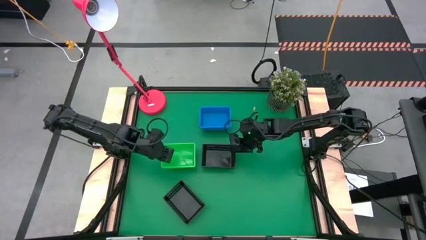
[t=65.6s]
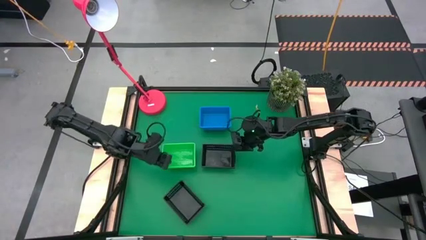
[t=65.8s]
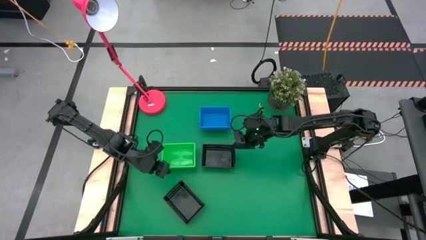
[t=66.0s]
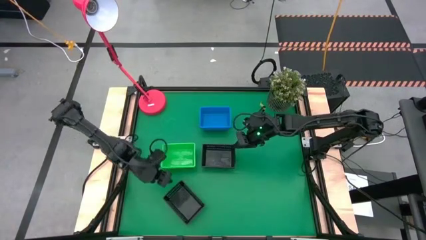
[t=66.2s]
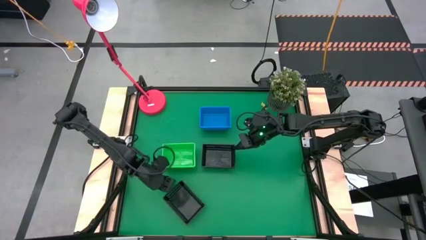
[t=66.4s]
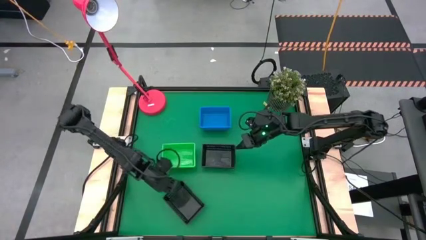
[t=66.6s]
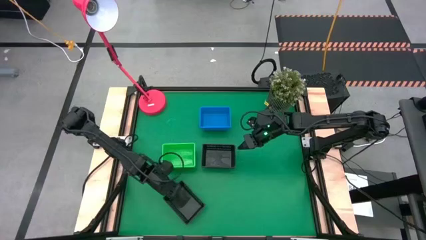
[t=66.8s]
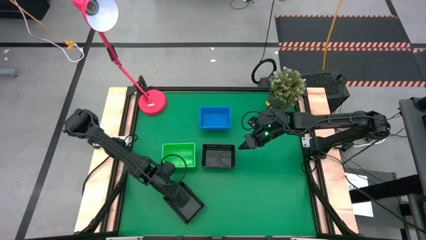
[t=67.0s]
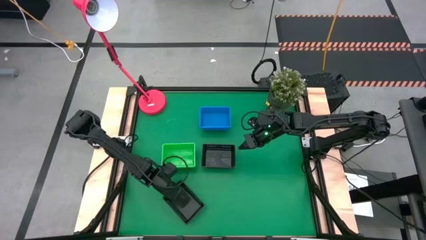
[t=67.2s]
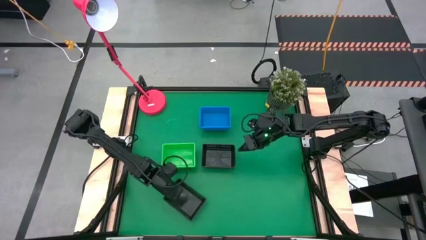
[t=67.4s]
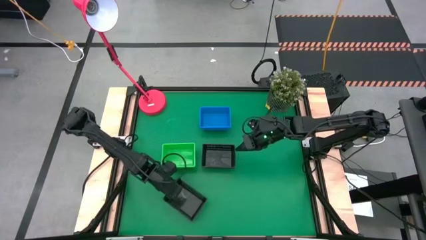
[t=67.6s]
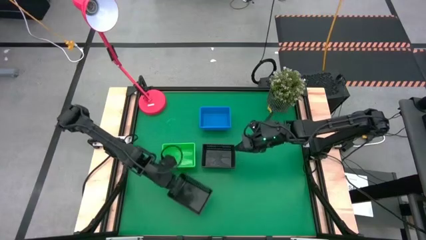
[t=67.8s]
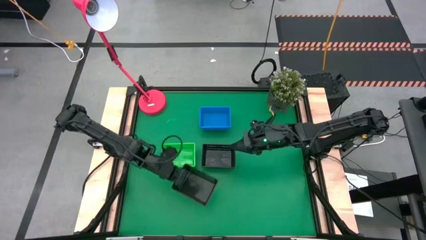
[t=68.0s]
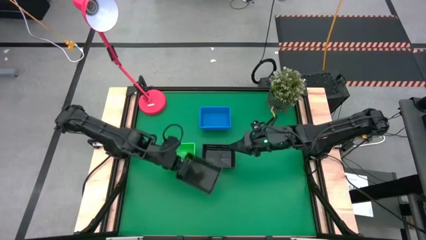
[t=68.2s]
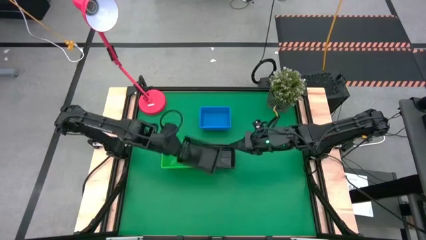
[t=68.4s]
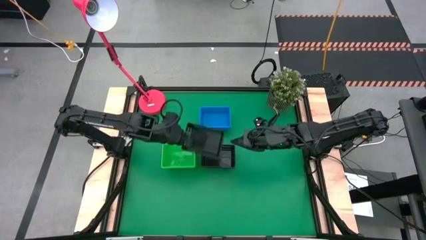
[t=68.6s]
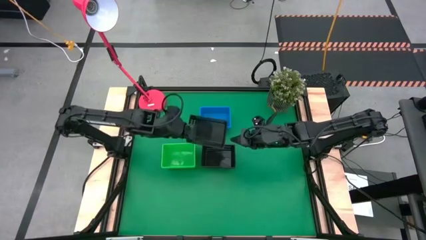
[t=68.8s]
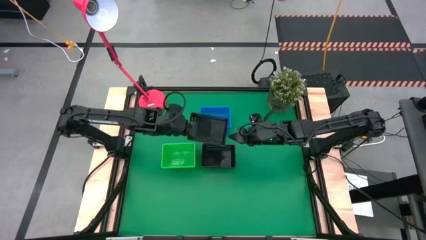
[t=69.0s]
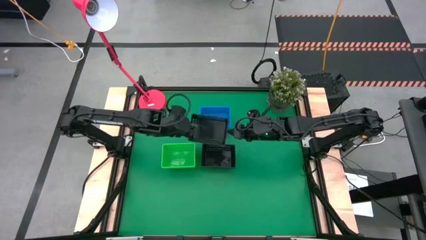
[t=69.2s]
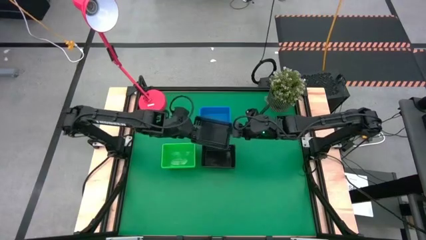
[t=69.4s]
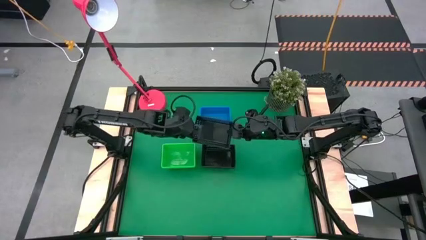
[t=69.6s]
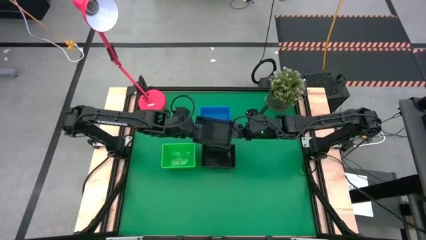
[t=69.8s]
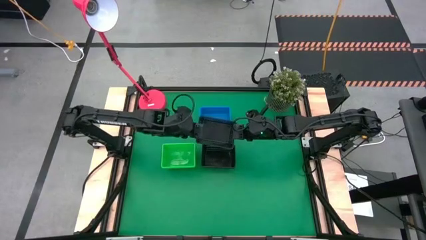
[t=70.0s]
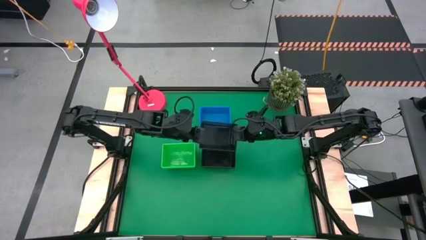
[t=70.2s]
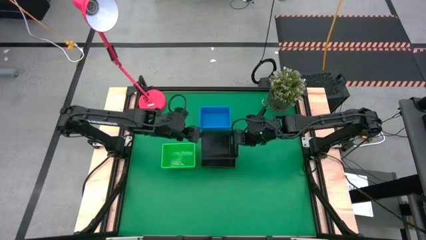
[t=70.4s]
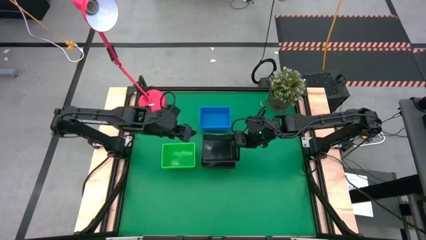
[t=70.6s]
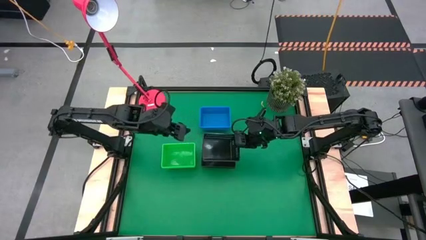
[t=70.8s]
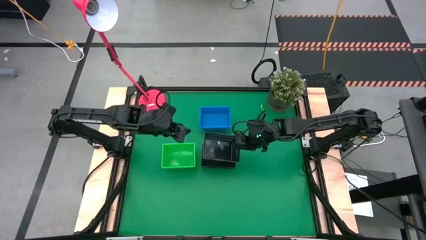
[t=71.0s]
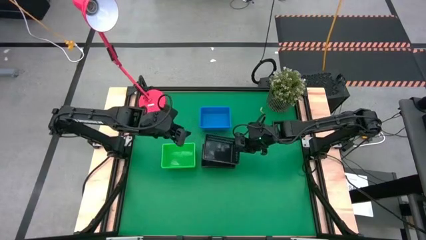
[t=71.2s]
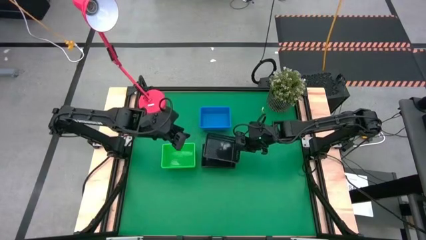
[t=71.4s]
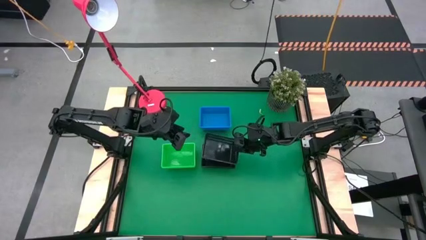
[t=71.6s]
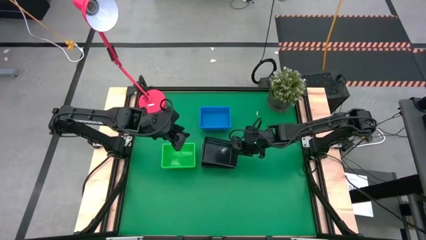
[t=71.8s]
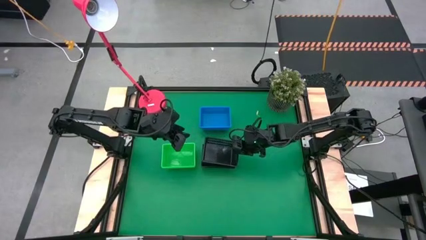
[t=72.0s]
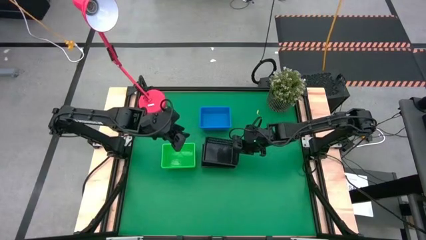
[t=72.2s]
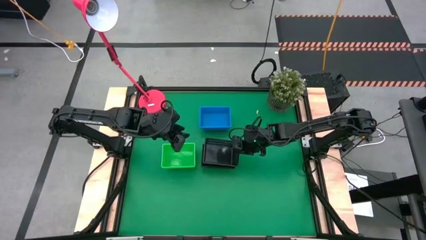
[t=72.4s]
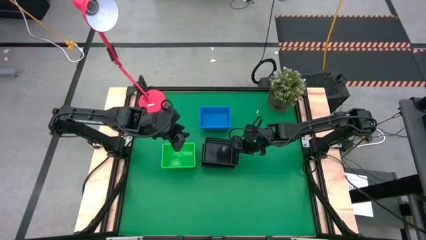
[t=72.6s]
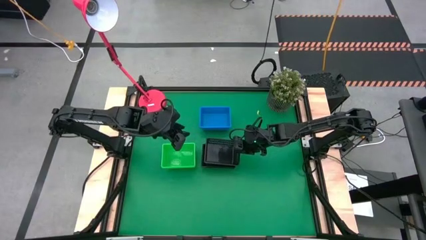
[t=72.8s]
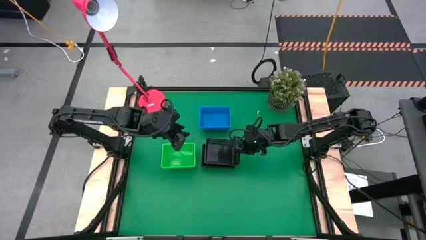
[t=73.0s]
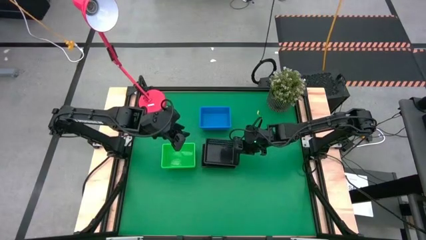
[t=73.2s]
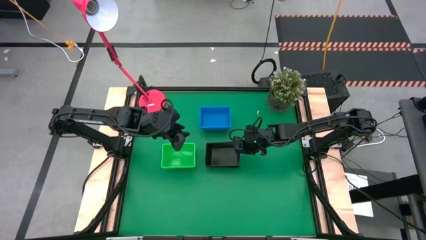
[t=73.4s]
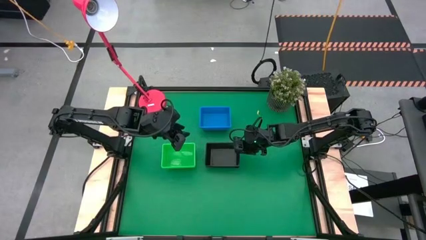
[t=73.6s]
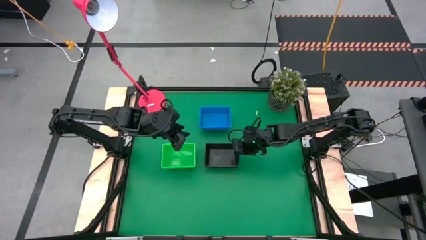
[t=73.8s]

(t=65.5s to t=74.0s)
Stack the bottom black bin on the top of the top stacked black bins

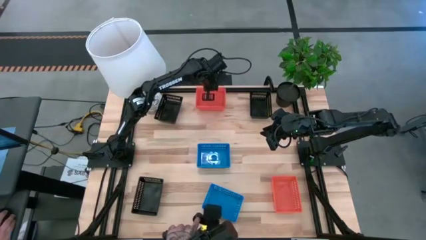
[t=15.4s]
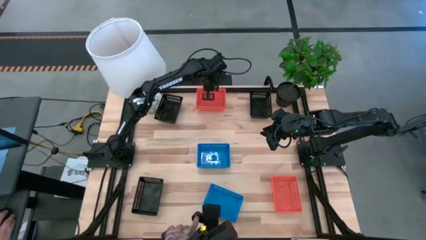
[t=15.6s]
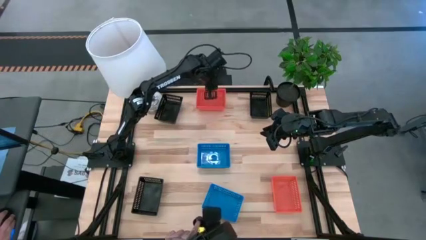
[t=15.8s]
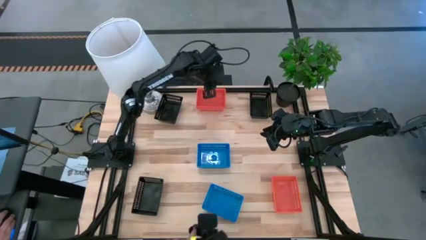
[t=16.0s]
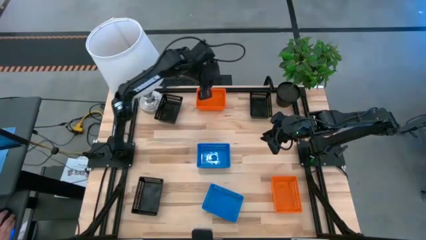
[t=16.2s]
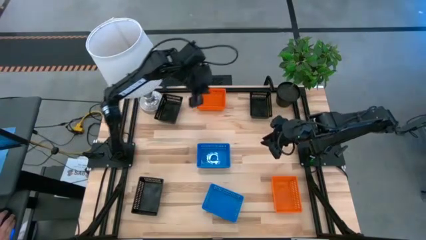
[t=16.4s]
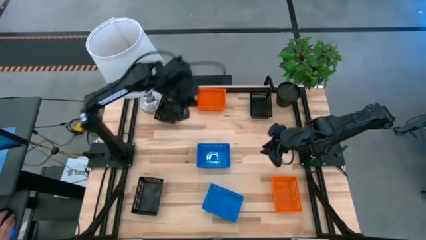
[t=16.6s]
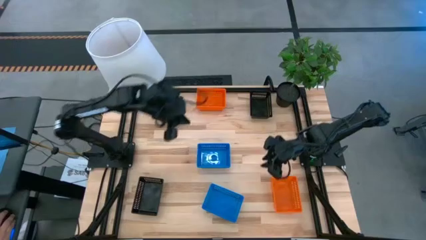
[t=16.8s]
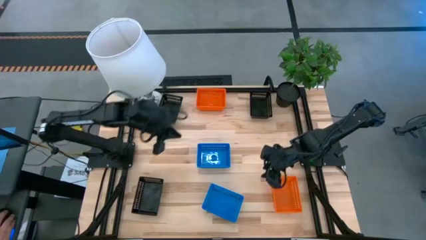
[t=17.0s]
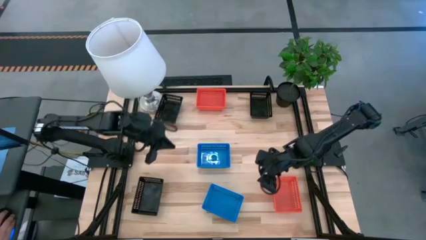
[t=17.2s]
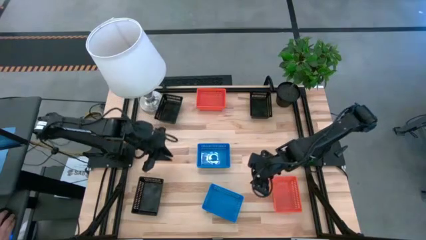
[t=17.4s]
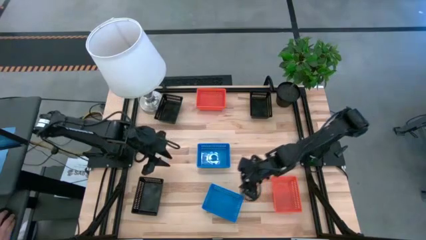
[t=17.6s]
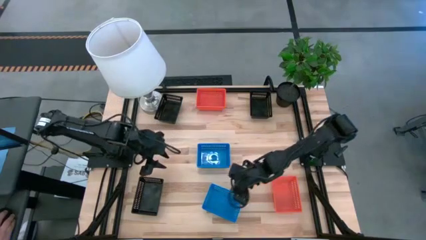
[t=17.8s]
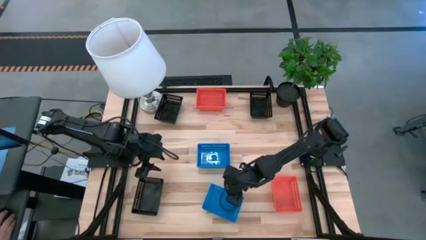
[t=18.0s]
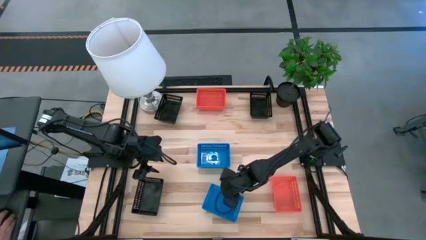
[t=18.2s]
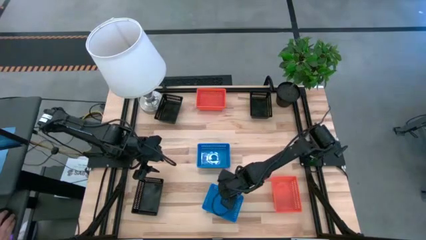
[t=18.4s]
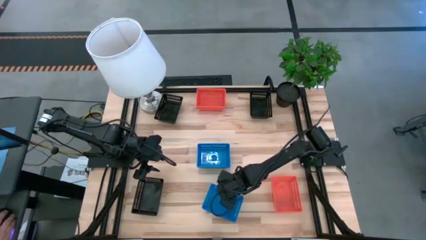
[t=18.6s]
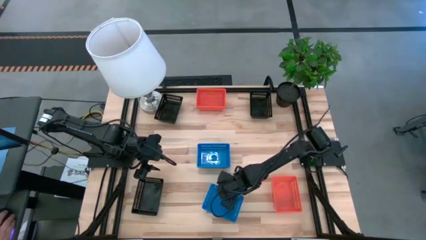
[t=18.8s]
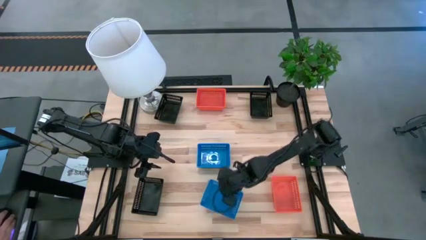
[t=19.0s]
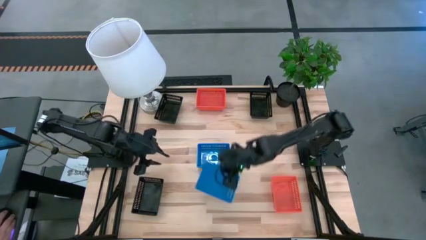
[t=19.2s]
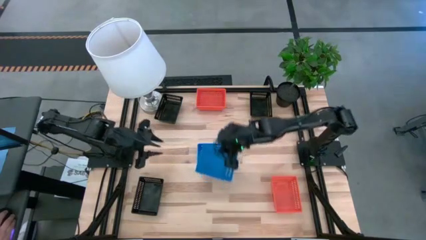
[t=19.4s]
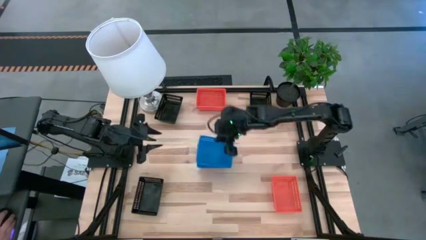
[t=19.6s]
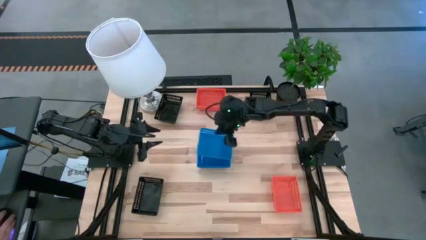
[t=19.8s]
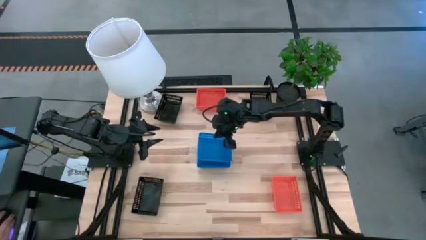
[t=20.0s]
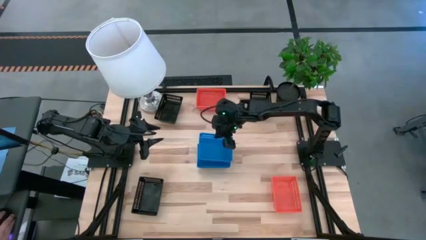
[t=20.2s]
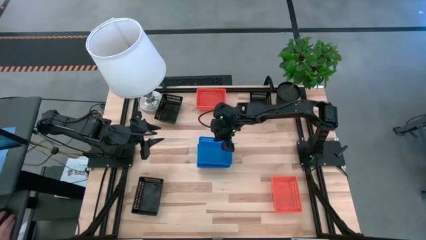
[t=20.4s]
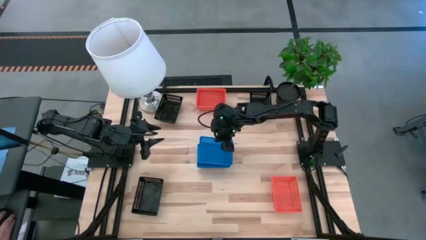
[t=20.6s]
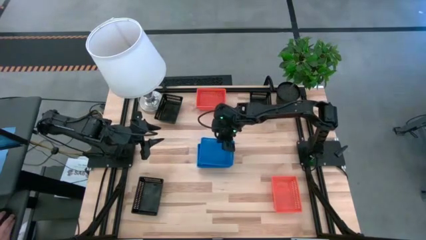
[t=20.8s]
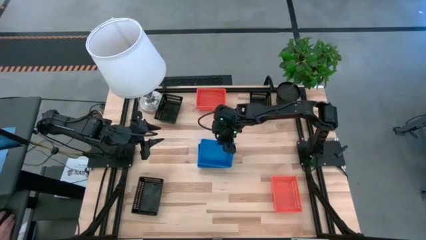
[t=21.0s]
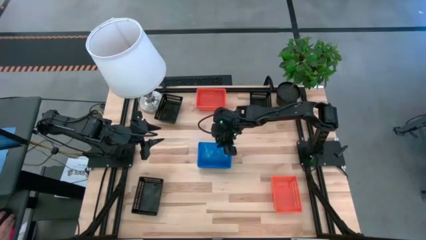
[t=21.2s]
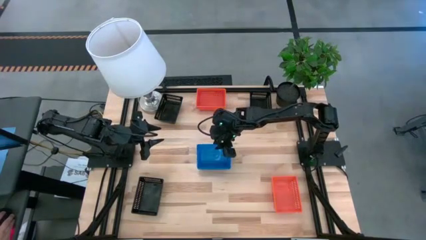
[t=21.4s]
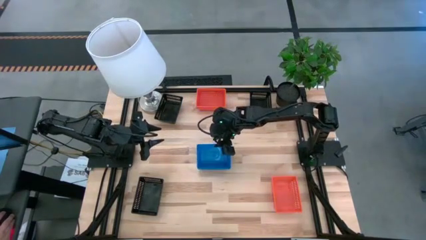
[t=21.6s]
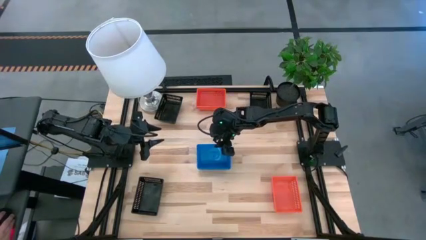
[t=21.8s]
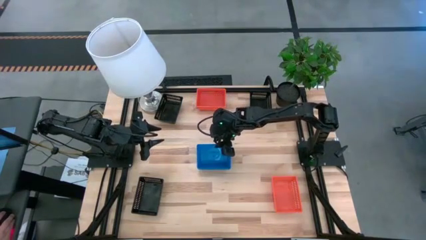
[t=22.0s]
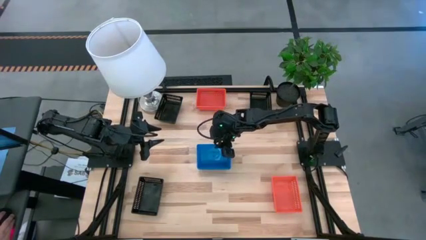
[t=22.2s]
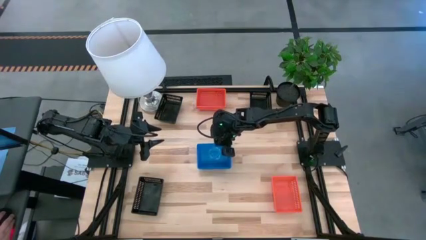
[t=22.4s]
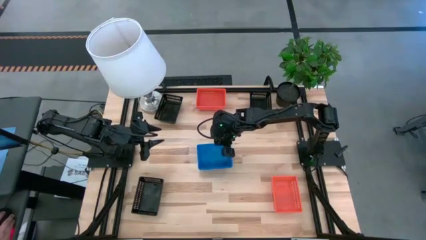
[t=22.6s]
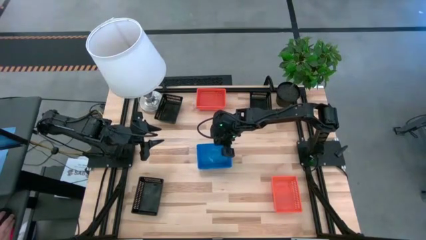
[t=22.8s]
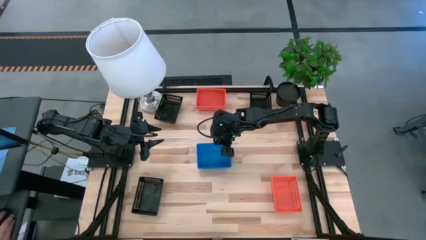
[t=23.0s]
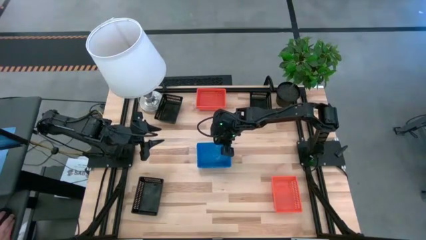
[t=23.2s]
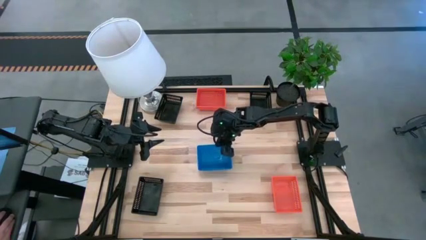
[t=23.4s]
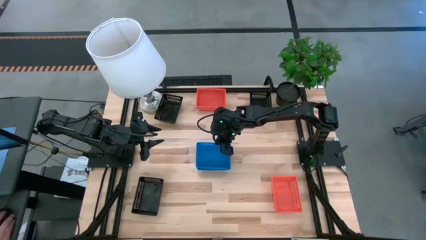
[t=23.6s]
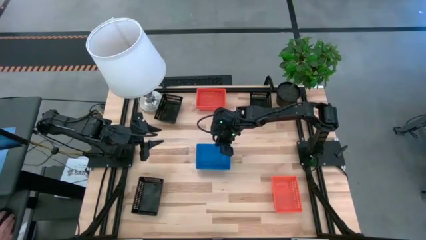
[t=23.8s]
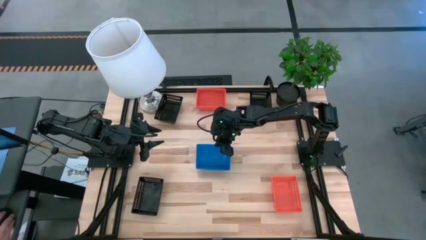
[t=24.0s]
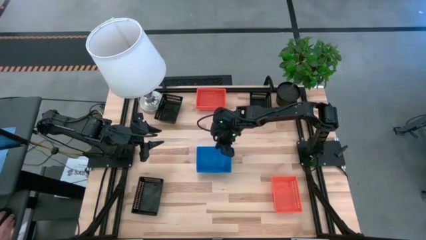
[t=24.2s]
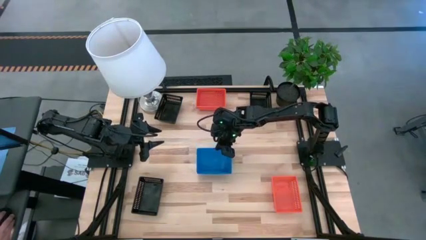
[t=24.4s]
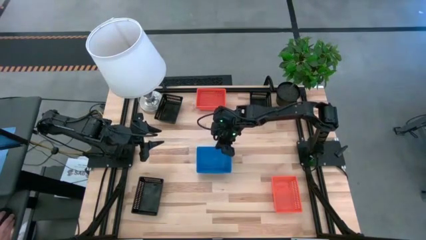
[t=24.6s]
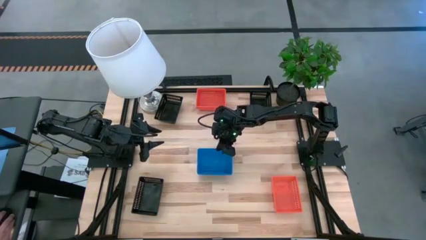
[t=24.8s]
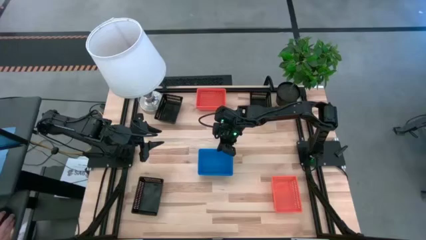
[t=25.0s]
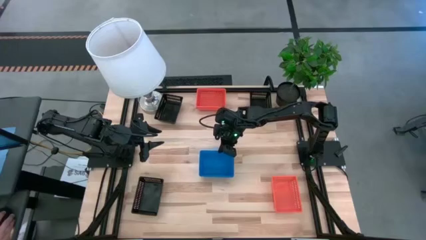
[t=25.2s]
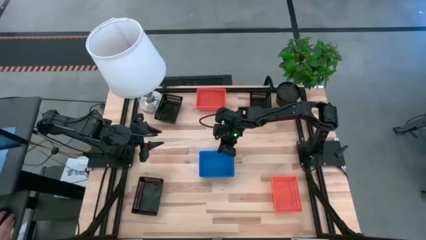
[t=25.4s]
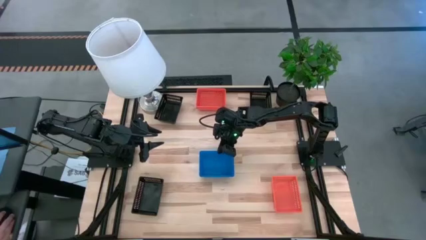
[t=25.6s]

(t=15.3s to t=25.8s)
Stack the blue bin on the top blue bins
